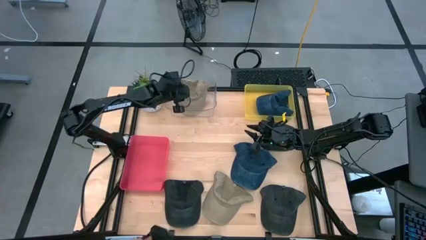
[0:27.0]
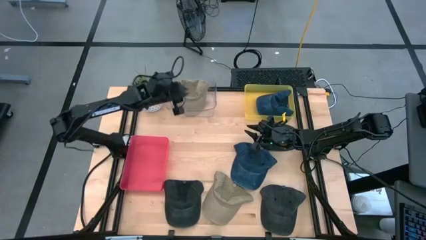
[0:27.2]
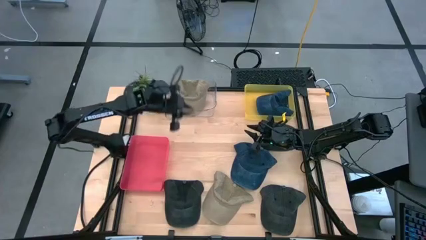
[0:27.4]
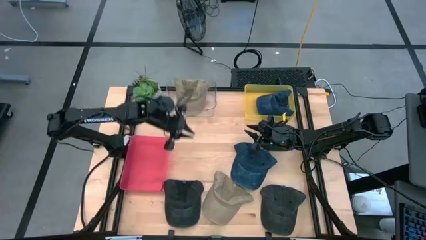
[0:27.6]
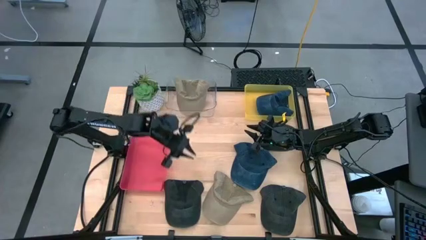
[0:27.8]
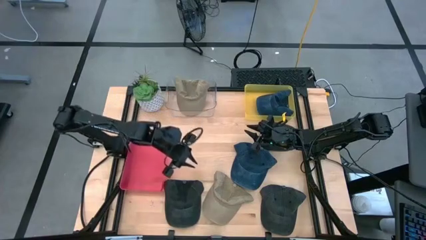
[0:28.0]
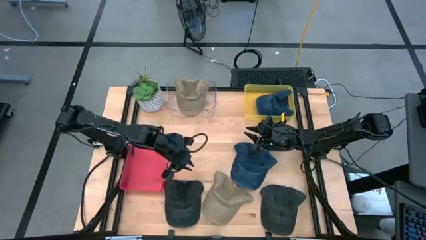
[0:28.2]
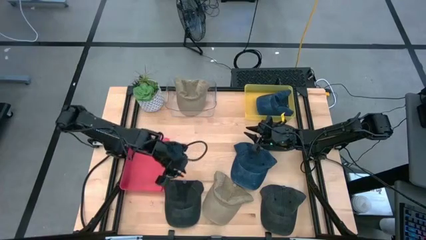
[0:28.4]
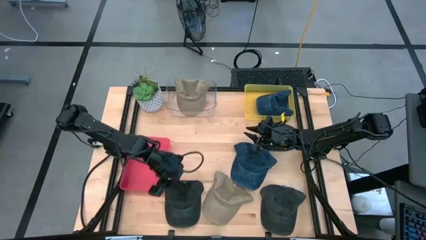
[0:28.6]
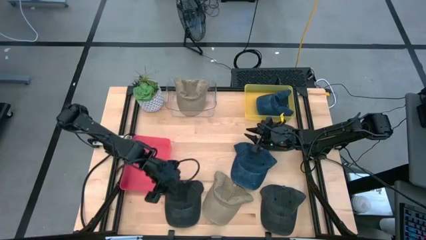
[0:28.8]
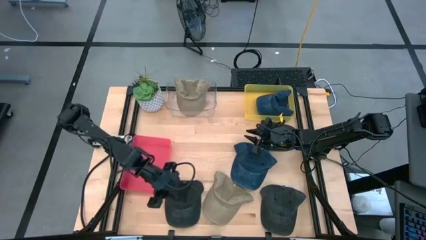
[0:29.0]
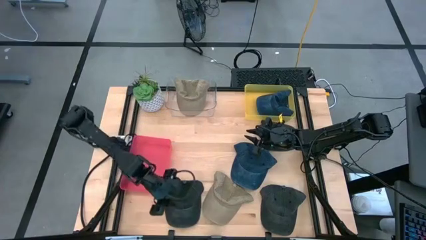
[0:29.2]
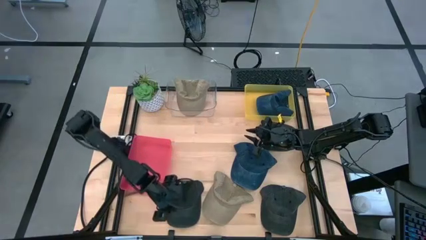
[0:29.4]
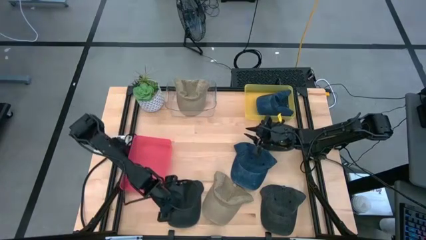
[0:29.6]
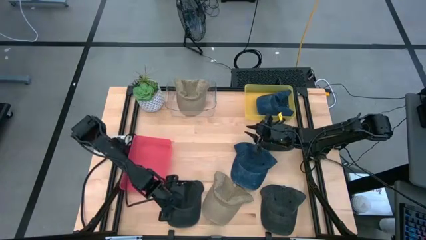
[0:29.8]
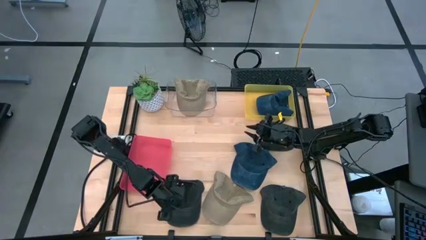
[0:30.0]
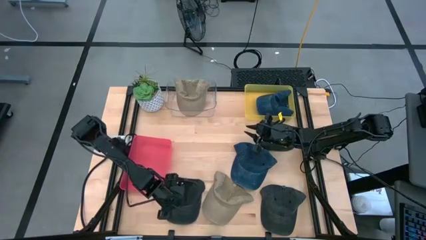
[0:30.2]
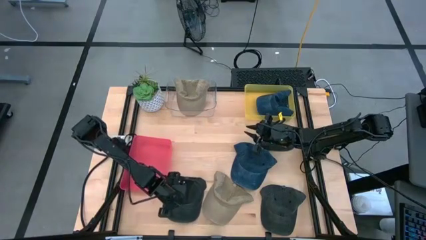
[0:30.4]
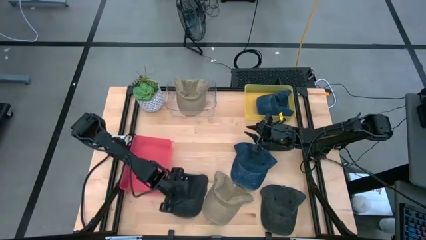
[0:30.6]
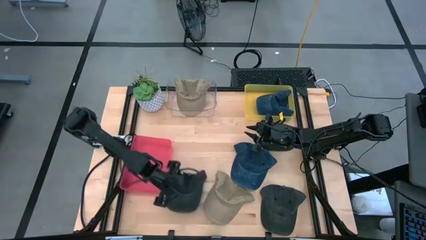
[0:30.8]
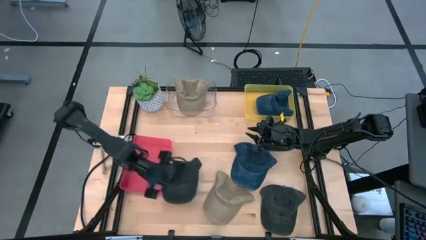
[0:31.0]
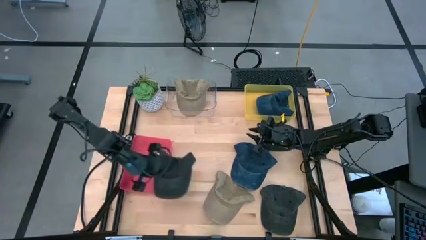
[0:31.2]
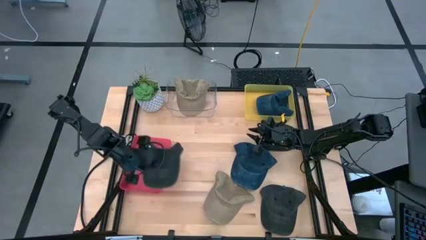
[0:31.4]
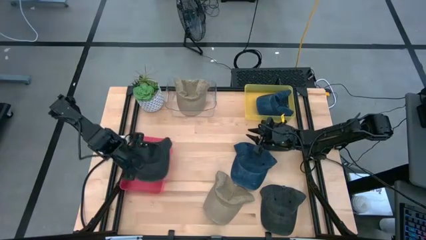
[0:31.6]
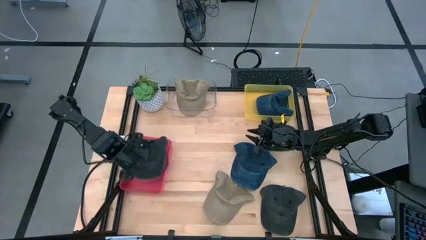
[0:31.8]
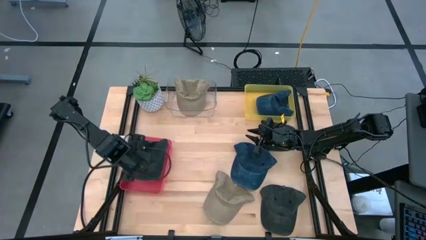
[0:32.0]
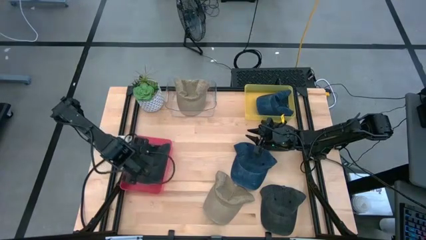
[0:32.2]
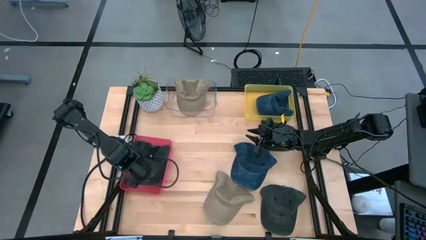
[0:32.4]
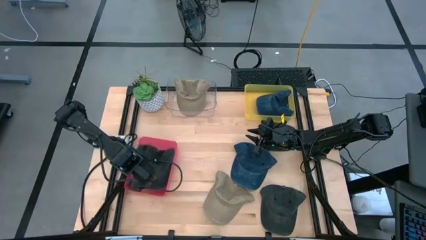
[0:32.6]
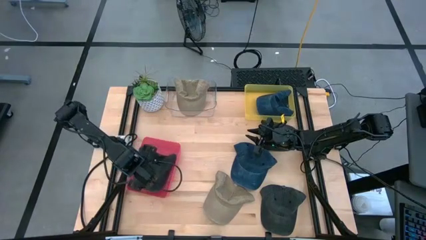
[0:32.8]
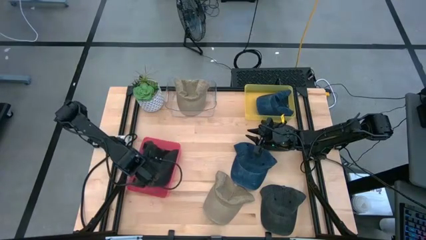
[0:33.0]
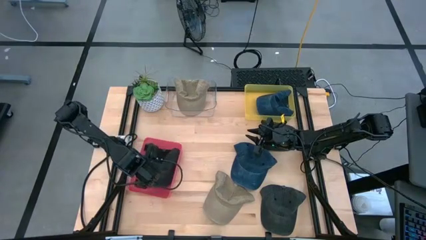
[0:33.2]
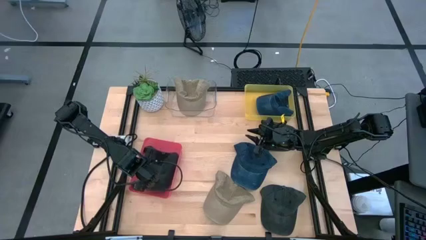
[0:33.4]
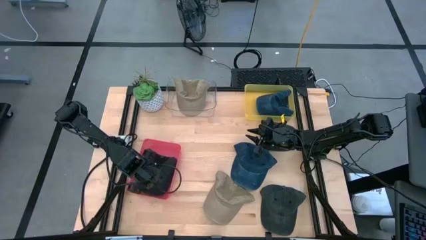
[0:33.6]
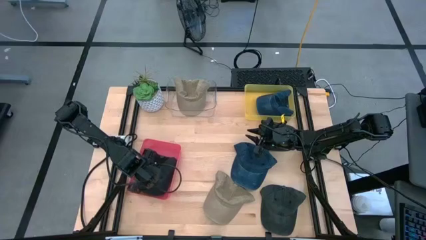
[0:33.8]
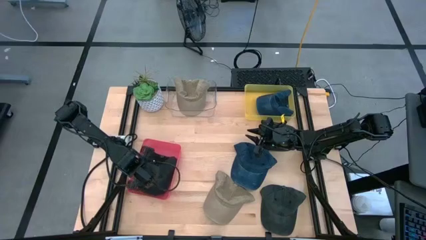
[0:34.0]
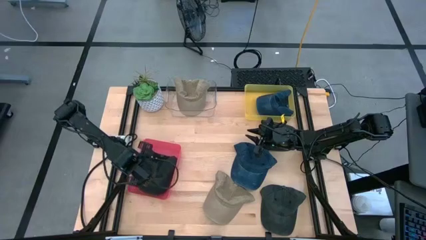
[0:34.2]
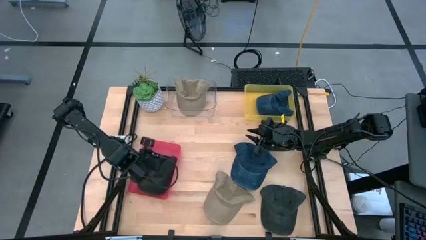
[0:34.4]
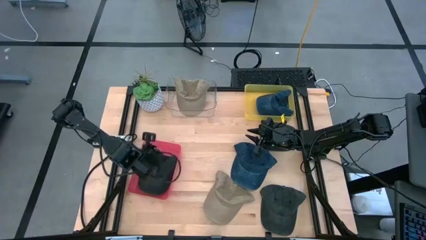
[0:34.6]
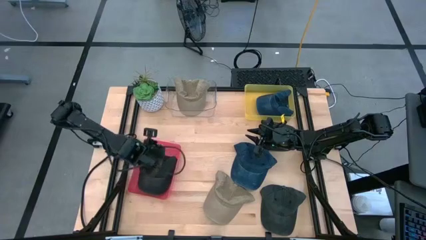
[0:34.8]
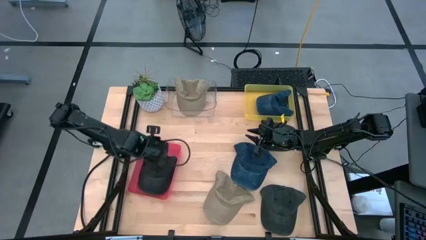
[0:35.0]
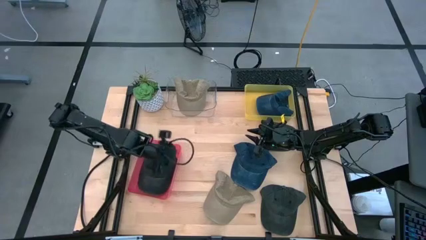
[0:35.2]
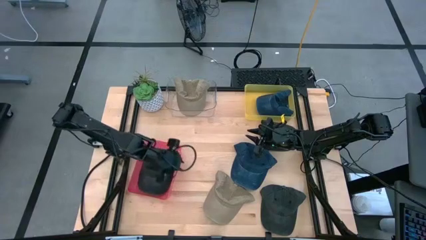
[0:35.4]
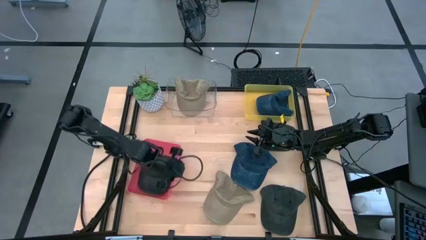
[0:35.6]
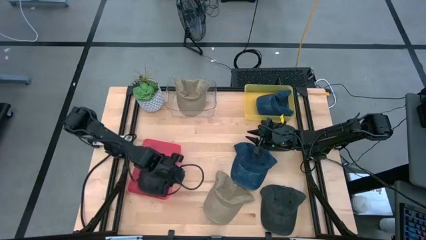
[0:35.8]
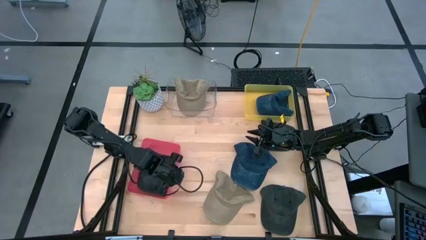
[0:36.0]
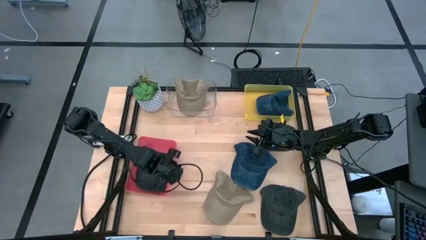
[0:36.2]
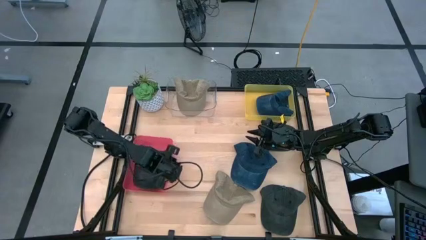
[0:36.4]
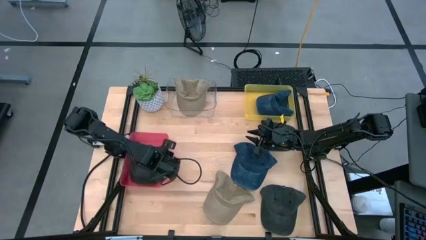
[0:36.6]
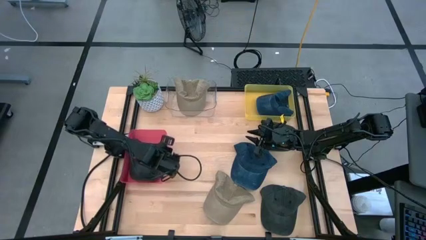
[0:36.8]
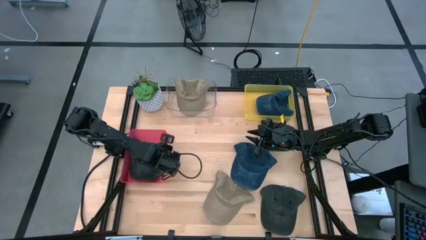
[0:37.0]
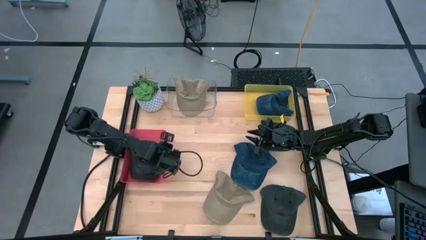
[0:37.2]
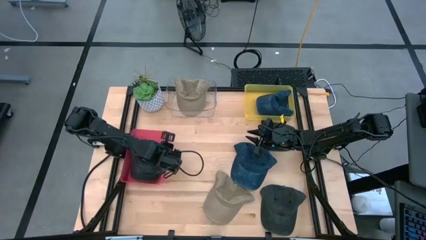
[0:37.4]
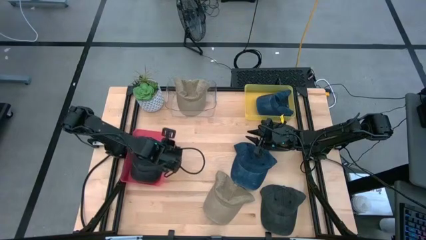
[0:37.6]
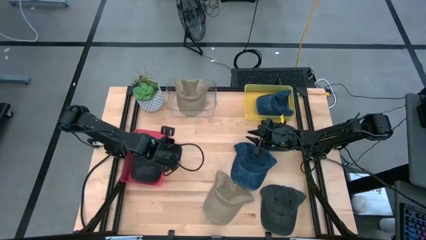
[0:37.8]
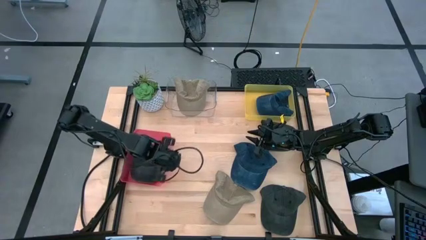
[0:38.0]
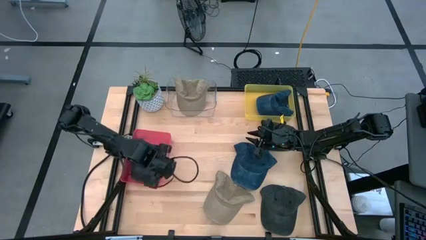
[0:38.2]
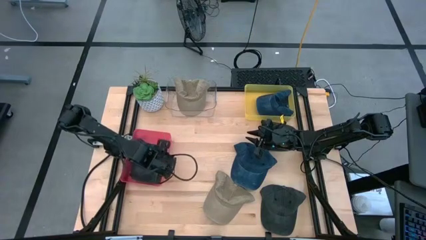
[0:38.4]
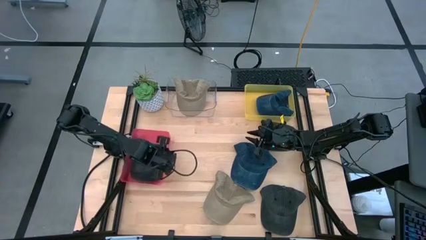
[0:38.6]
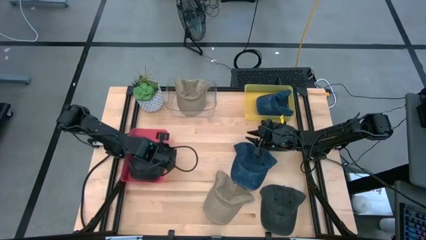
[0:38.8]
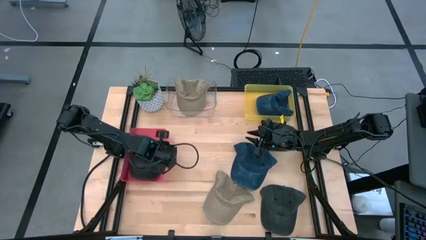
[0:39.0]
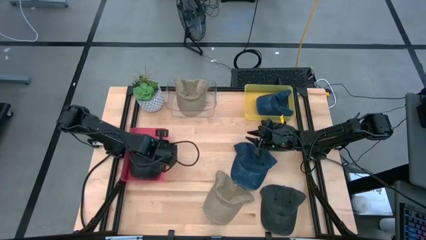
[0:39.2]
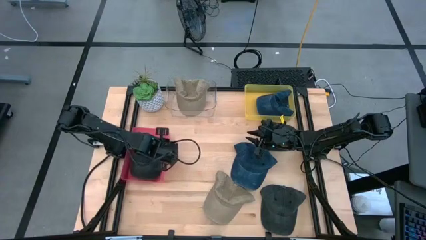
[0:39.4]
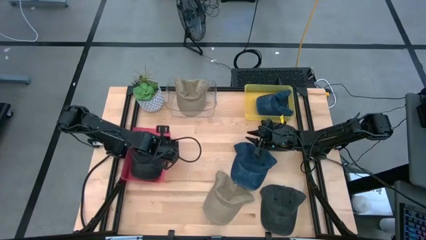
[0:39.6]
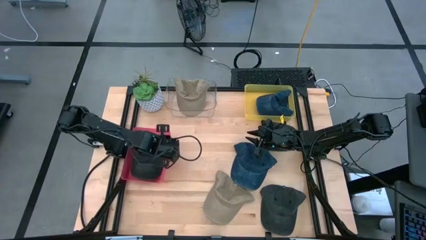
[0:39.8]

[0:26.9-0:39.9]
Task: Pick & Place hat
Put the left black cap into the red bin
